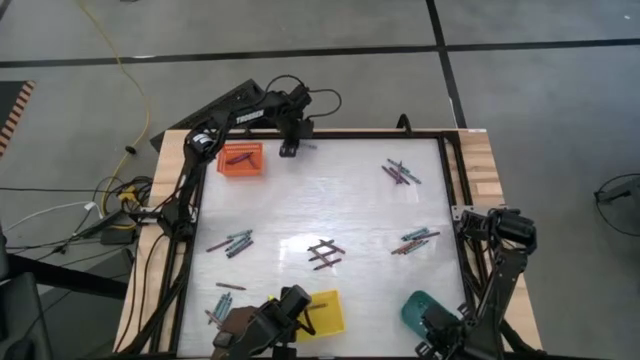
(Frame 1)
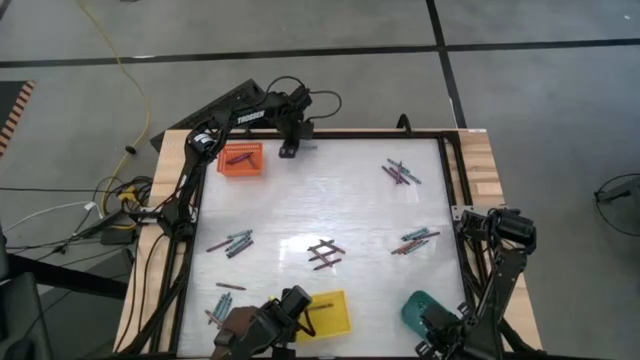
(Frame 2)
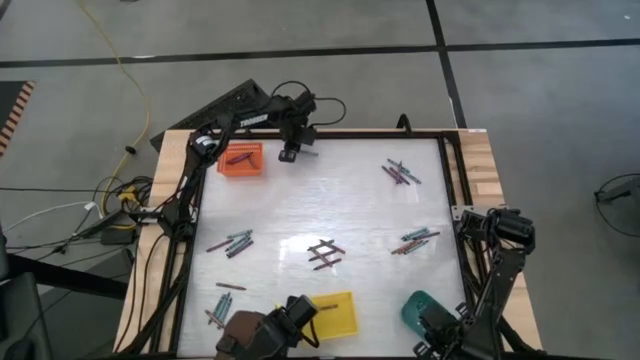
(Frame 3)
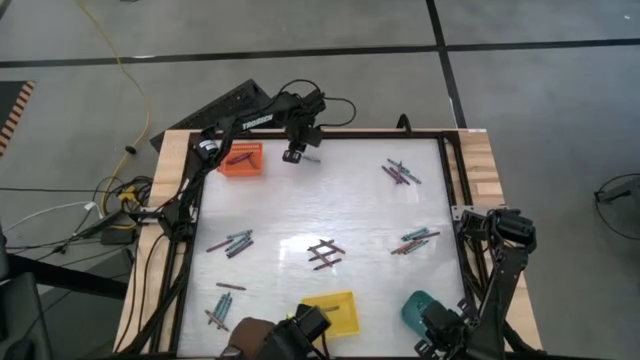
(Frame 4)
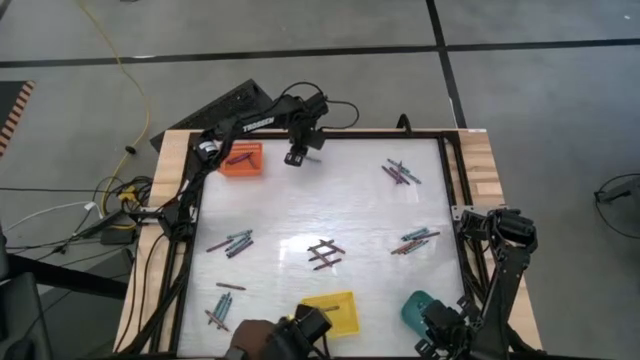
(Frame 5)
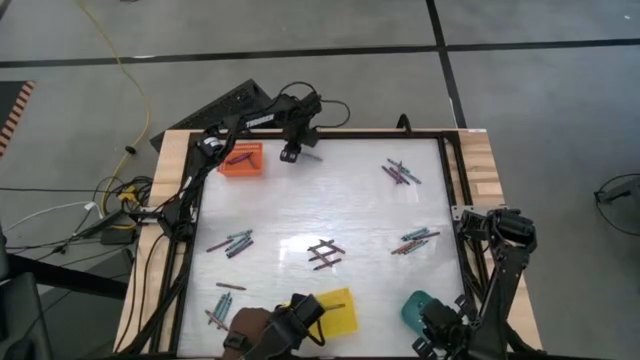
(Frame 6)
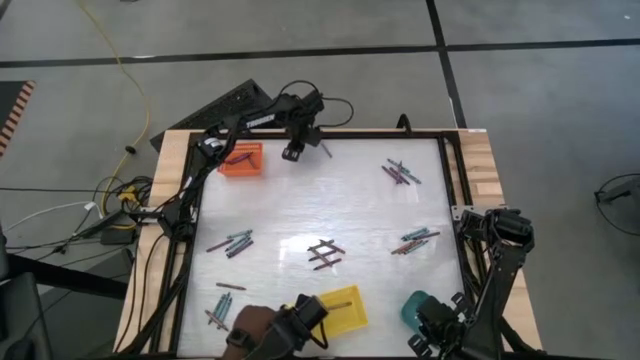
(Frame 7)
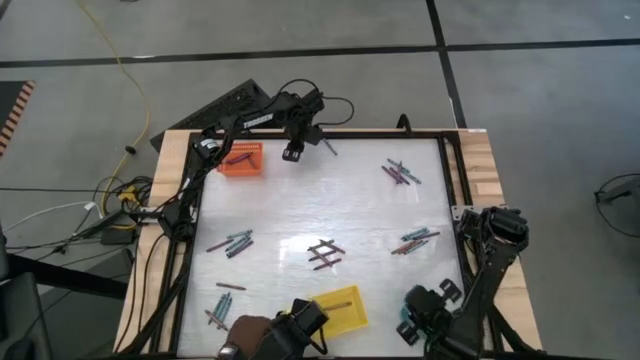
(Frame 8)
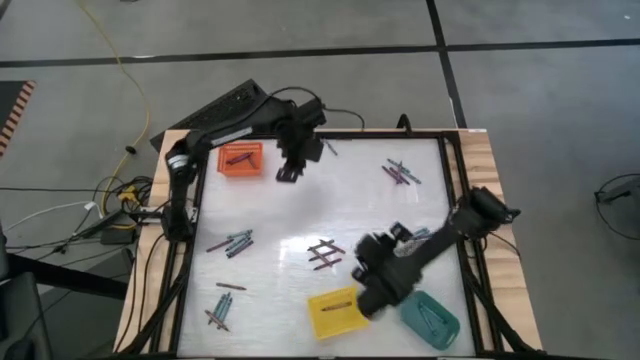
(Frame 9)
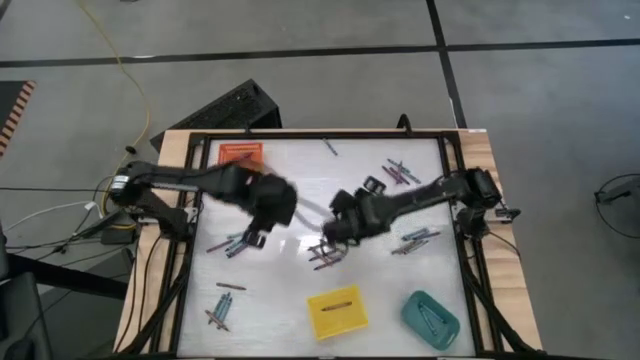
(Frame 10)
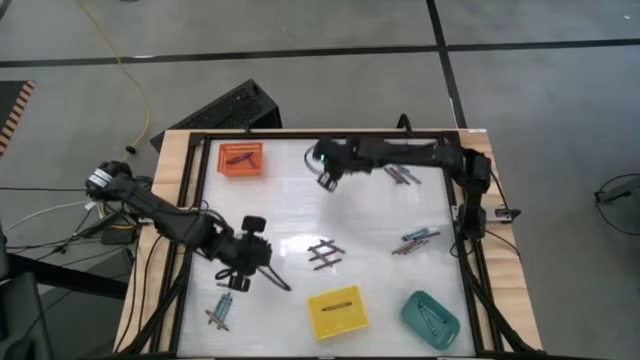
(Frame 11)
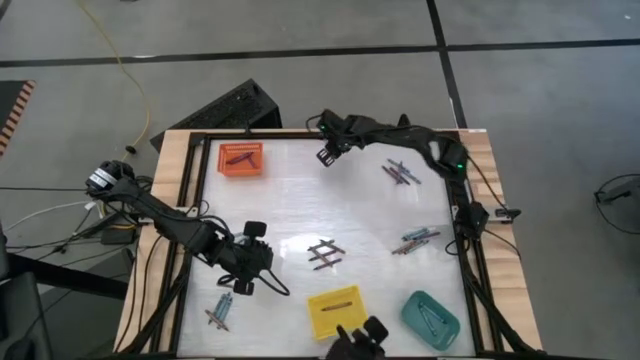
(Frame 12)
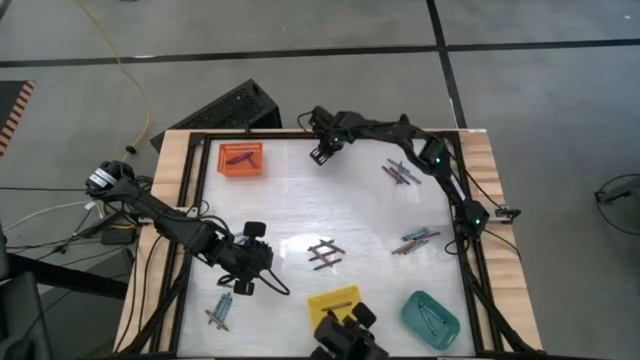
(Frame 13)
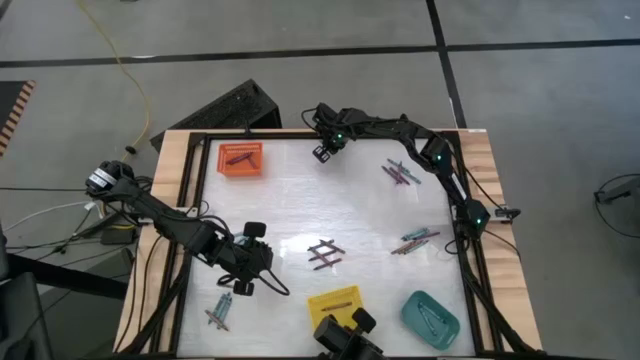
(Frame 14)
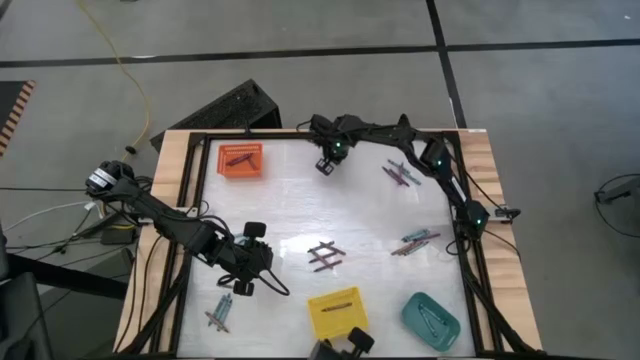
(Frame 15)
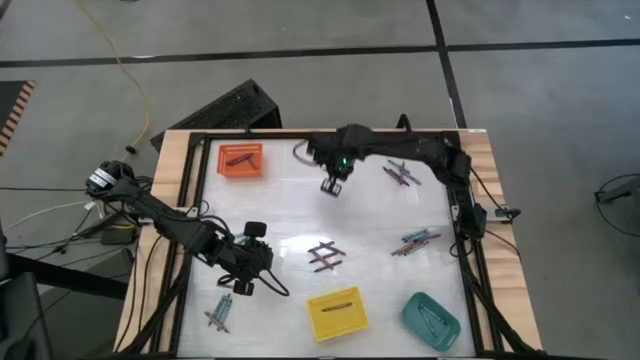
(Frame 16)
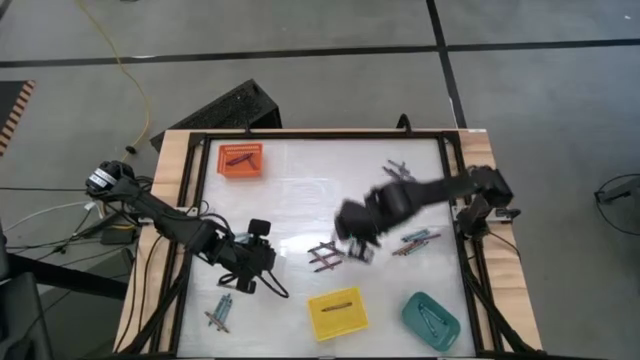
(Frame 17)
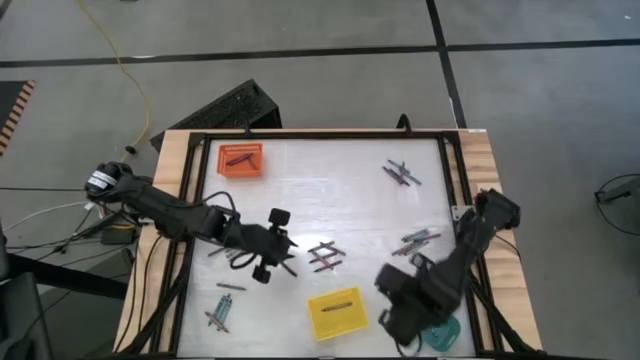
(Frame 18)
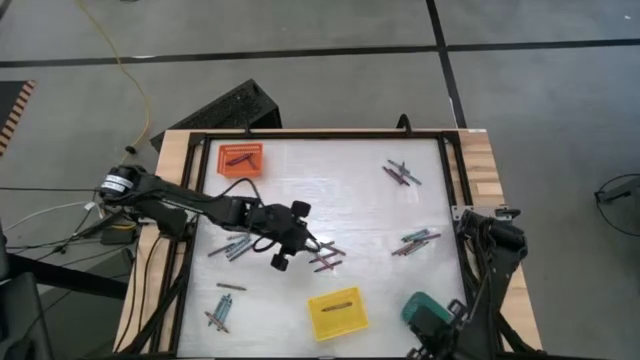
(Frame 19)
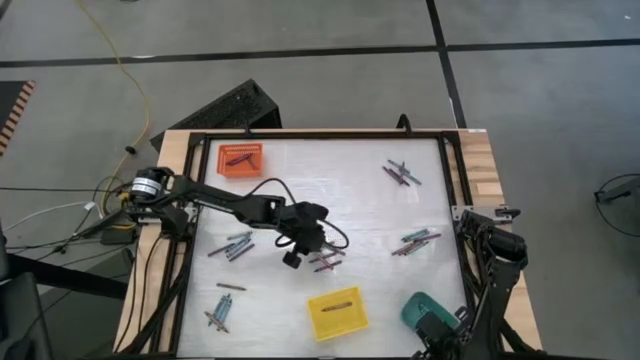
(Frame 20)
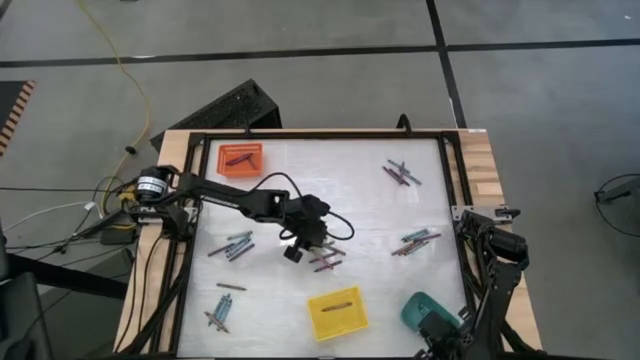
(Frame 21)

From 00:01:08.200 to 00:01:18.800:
Task: Sort crayons
Put the green crayon into the green bin

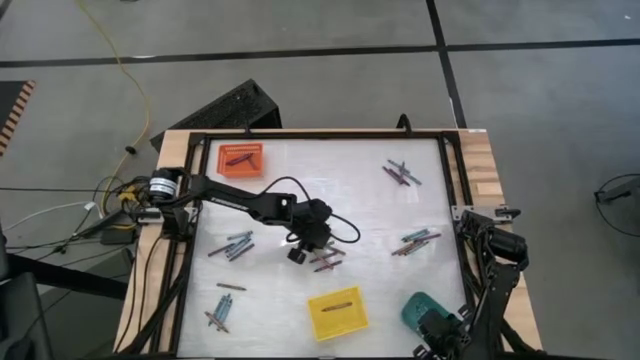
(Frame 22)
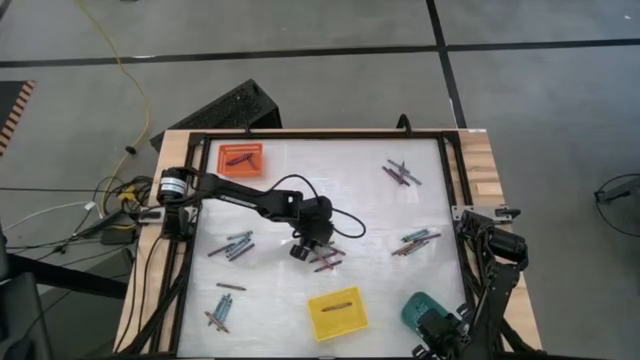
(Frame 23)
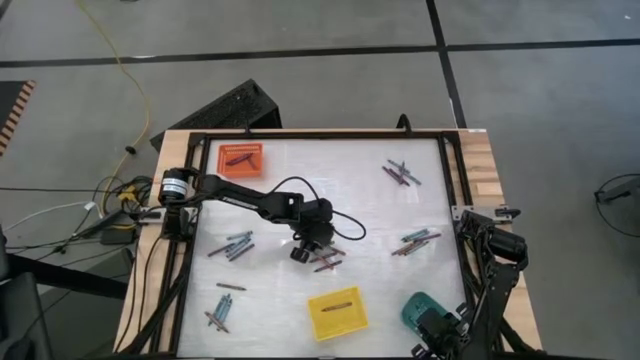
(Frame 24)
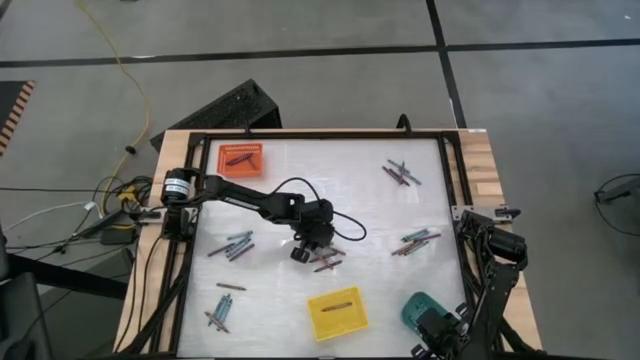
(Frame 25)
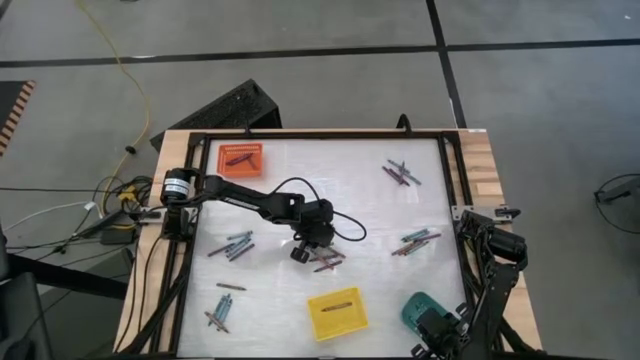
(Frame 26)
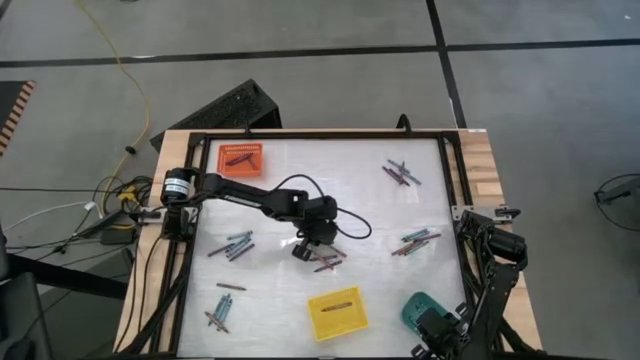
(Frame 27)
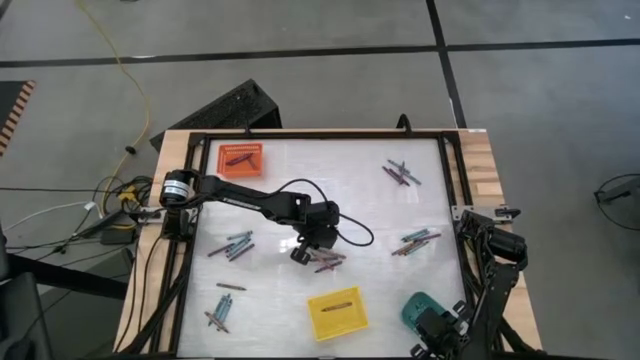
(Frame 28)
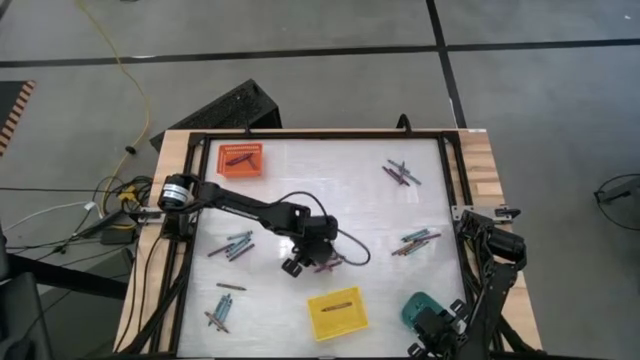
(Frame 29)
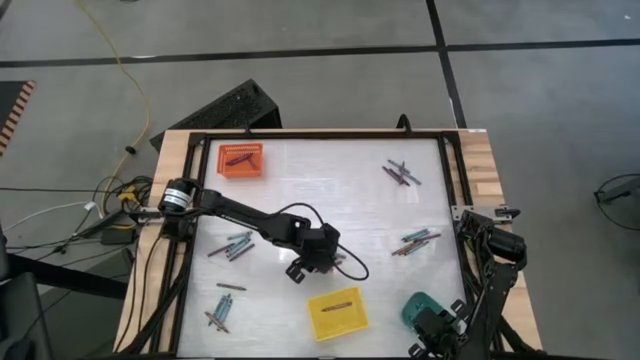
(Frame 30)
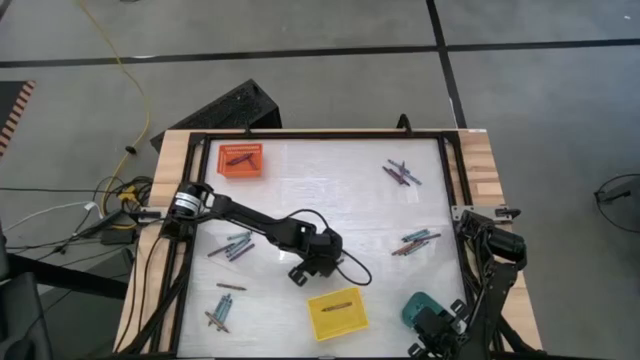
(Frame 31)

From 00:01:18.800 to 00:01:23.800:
Put the brown crayon into the yellow bin

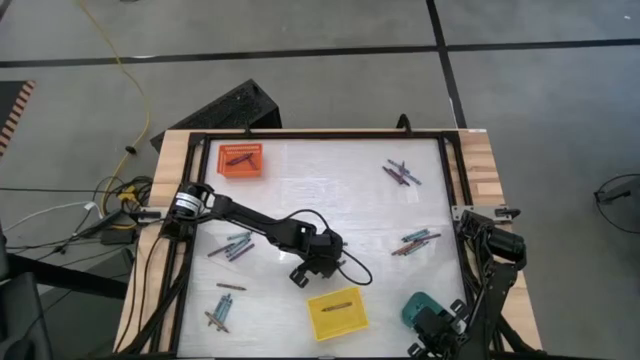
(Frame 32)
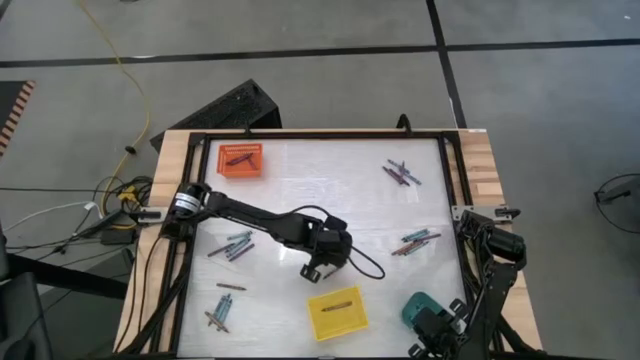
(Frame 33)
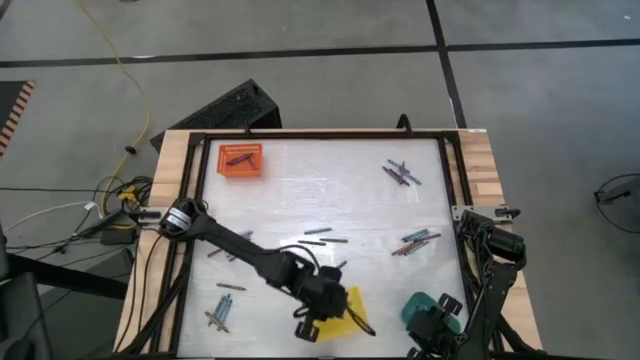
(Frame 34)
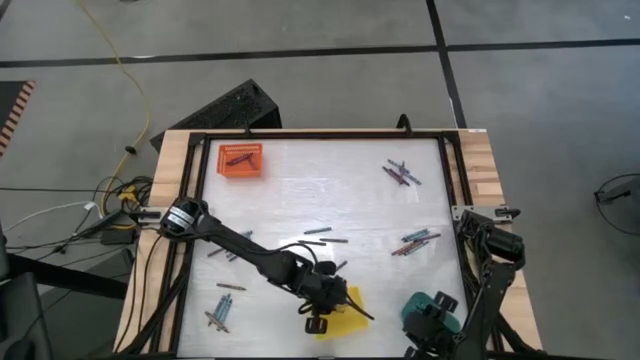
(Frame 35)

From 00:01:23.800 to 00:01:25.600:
Put the brown crayon into the yellow bin

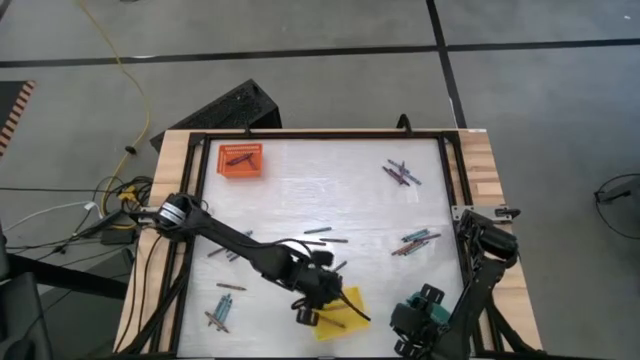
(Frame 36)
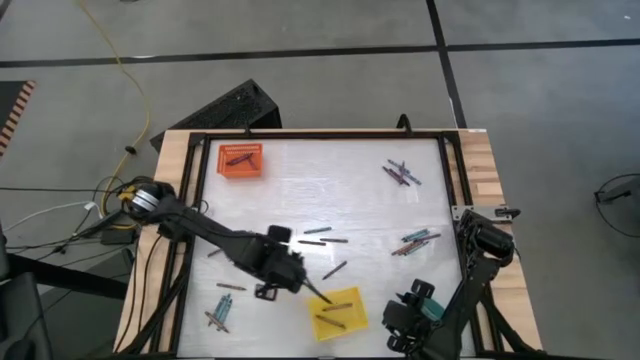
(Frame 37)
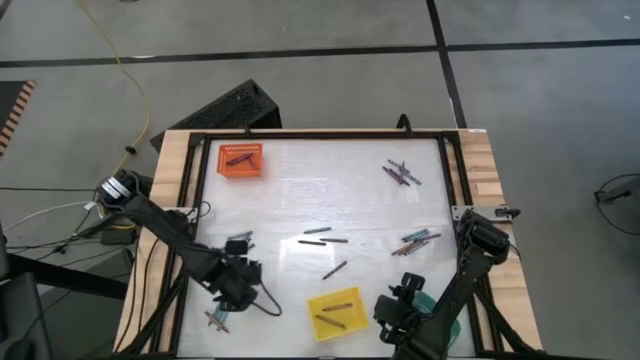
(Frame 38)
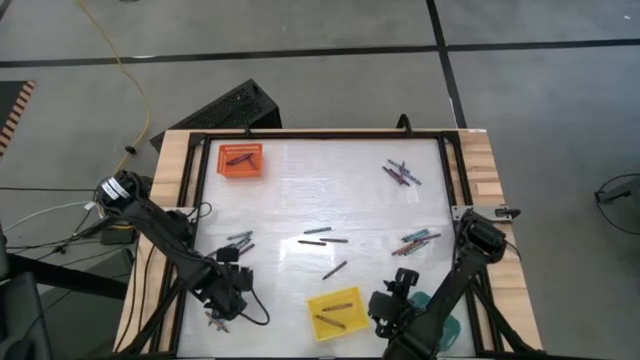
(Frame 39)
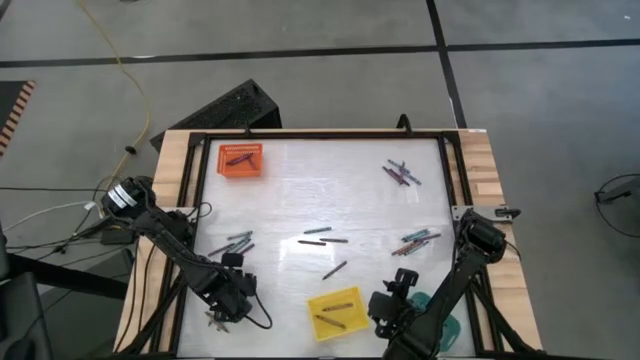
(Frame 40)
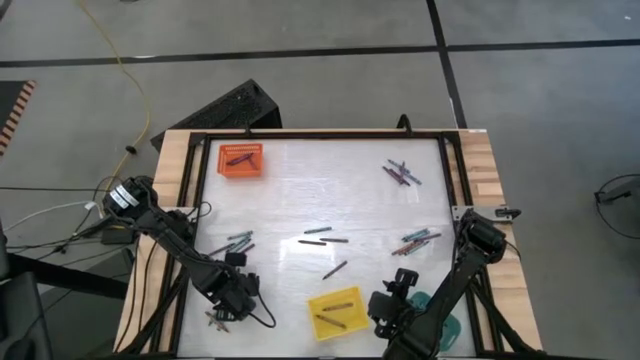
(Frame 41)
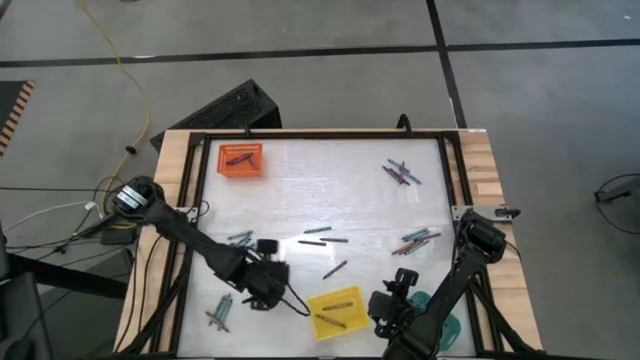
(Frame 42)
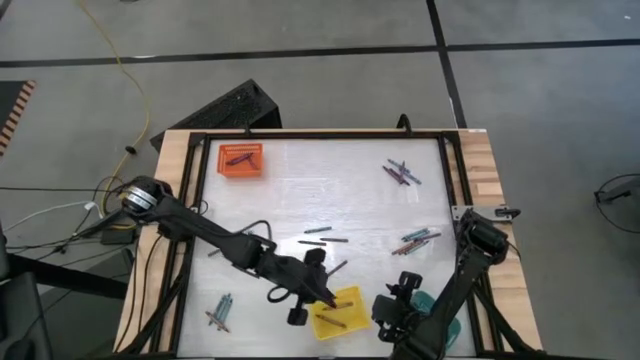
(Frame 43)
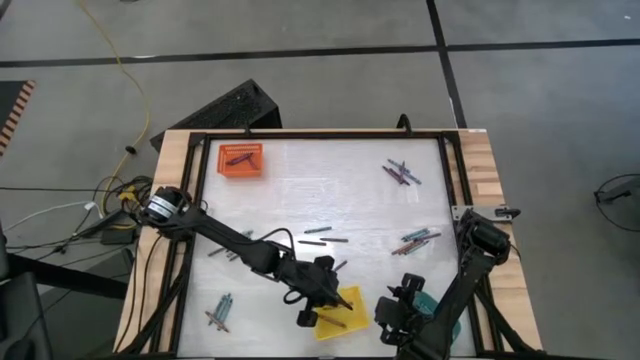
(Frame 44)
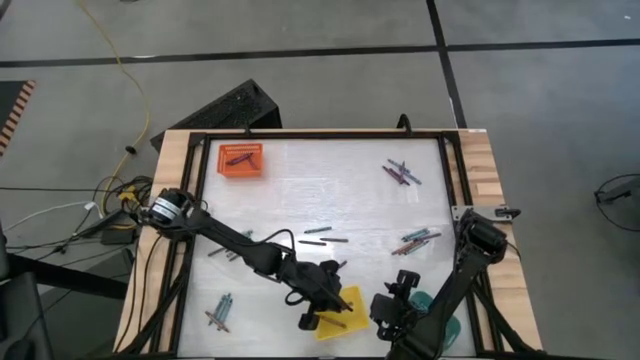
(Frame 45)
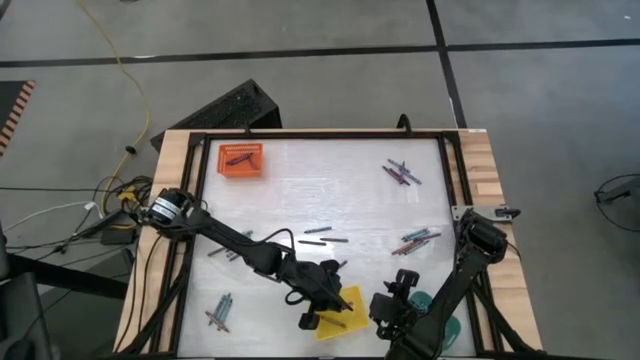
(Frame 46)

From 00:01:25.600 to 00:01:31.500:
Put the brown crayon into the yellow bin
